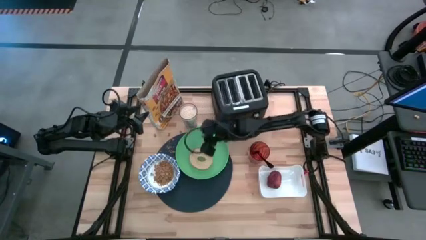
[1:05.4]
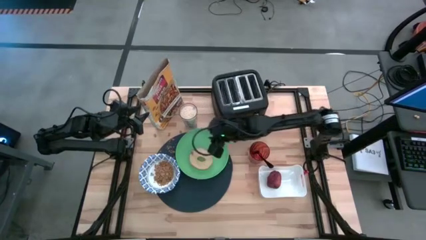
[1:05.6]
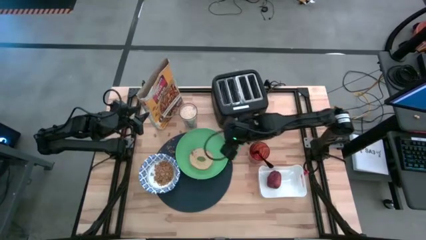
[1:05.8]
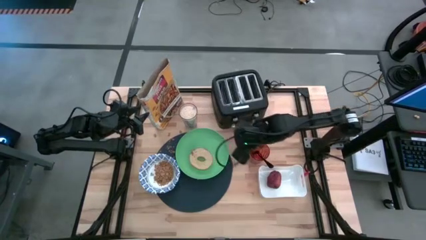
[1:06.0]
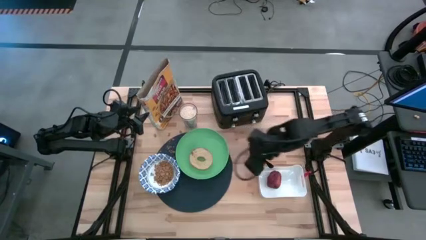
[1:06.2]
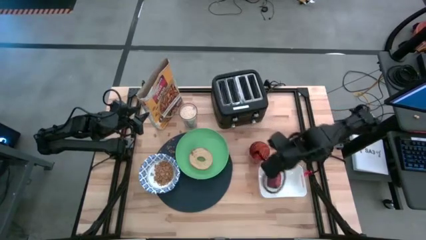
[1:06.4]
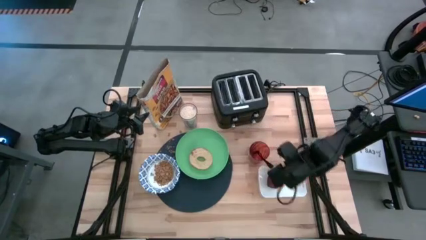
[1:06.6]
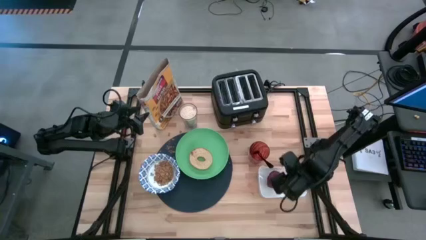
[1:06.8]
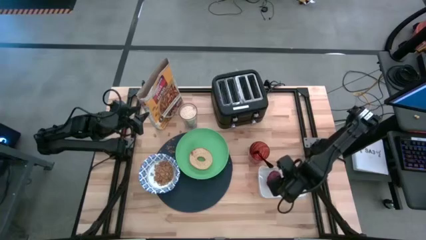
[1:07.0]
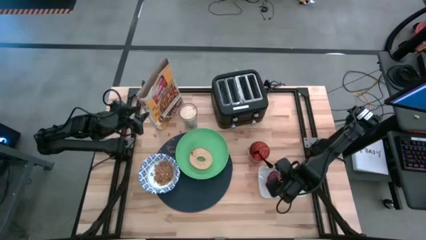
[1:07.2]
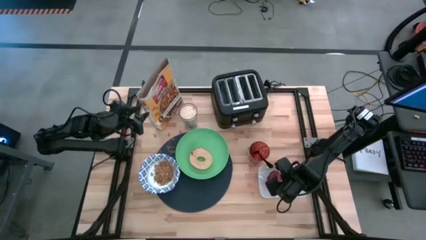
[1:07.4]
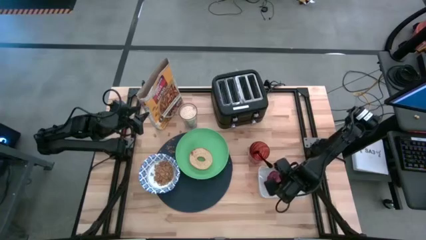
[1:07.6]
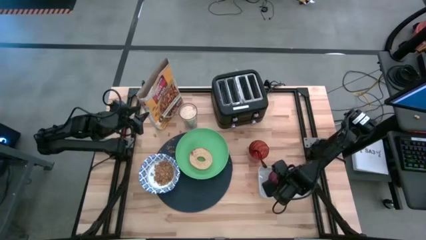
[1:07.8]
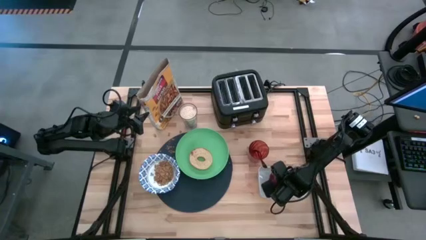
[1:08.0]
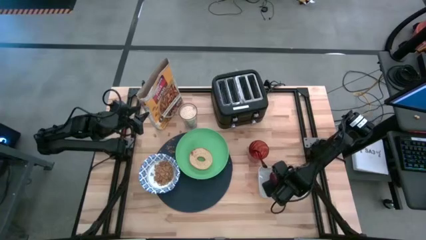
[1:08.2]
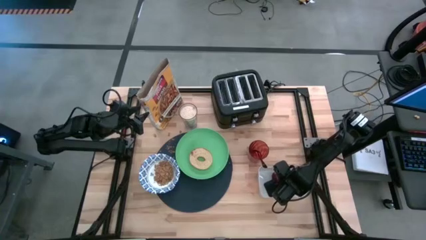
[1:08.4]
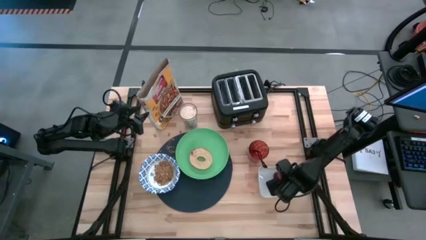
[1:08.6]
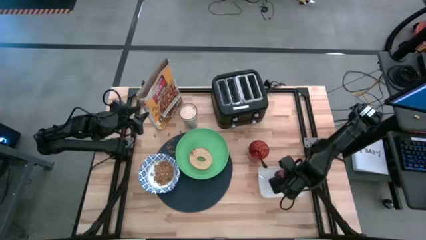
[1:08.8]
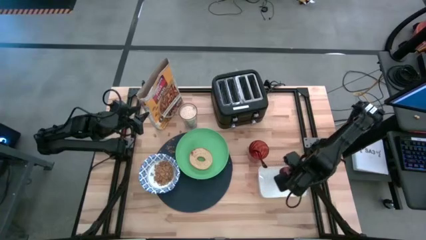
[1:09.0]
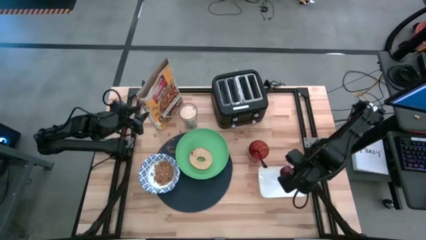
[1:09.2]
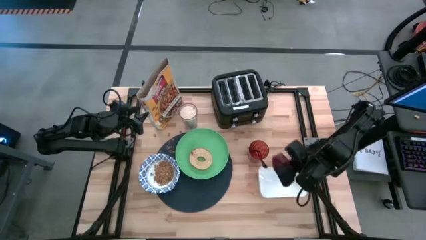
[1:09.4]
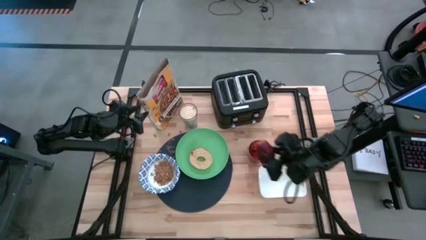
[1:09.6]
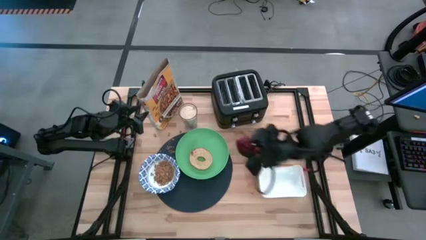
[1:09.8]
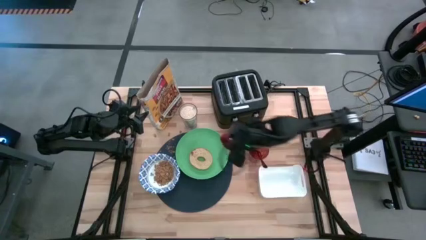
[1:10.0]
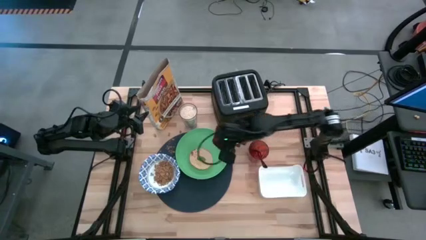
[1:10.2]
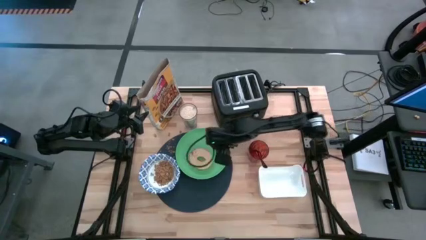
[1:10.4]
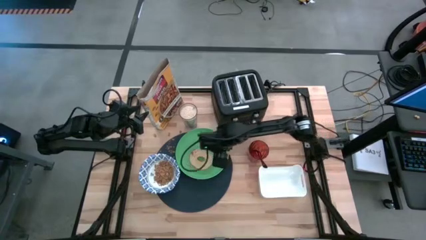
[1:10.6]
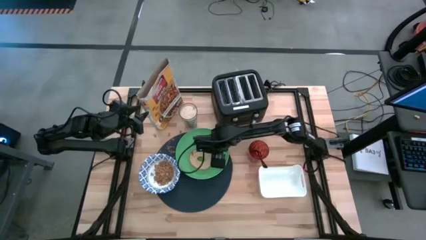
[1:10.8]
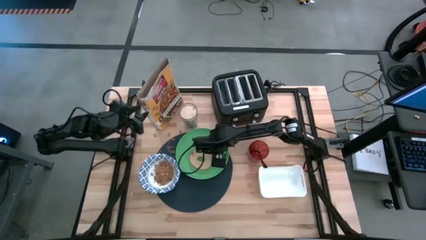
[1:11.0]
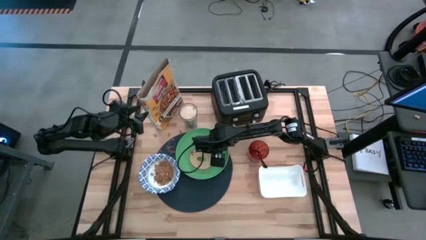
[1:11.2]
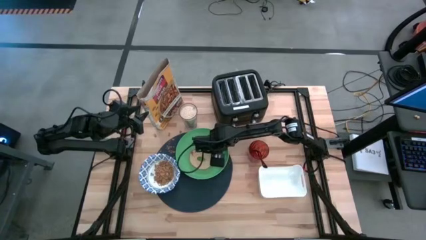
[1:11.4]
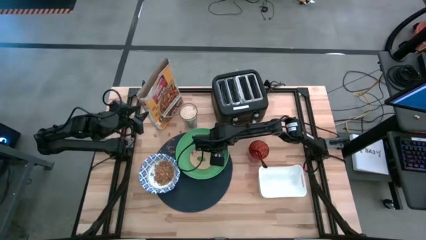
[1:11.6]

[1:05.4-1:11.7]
Task: Arrange a breakfast setting
Put the apple on the green plate

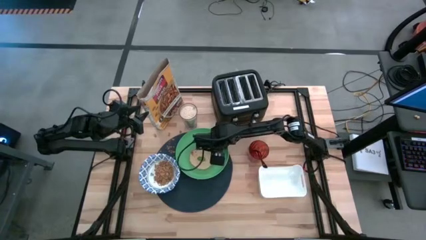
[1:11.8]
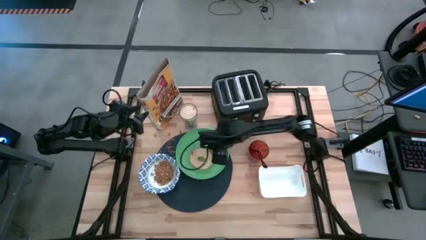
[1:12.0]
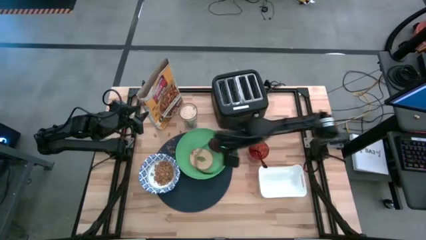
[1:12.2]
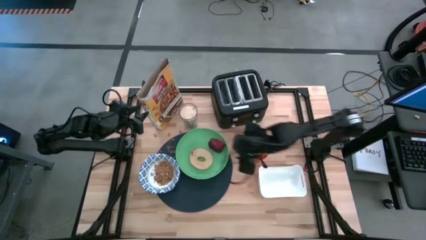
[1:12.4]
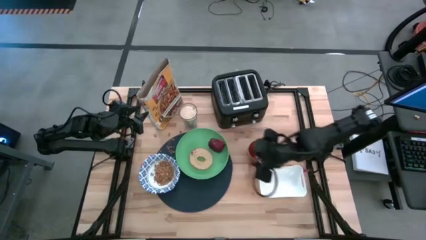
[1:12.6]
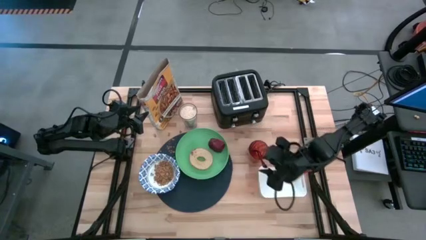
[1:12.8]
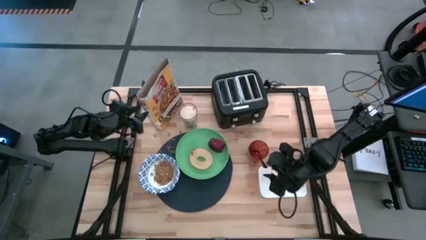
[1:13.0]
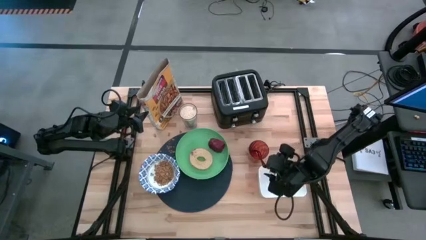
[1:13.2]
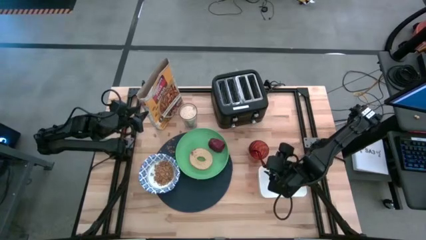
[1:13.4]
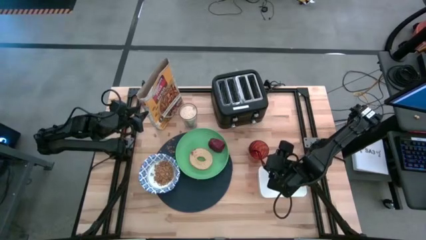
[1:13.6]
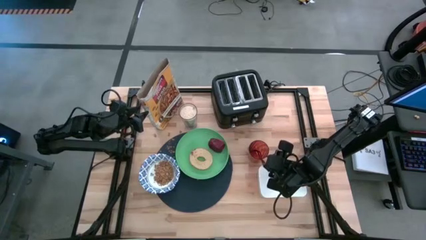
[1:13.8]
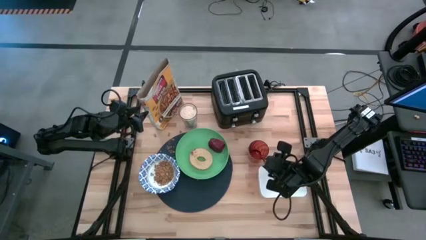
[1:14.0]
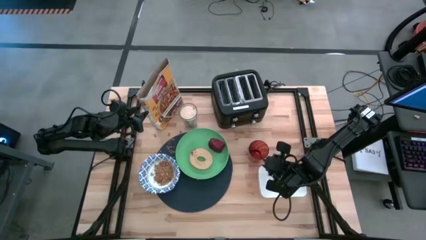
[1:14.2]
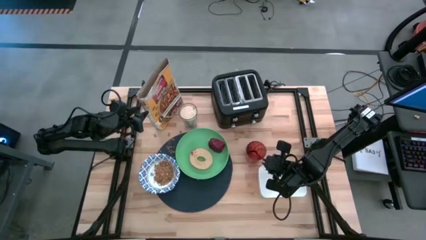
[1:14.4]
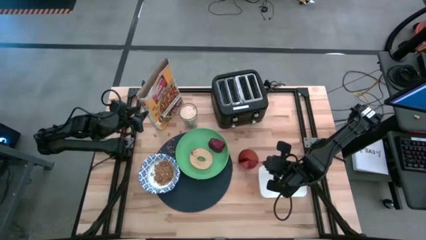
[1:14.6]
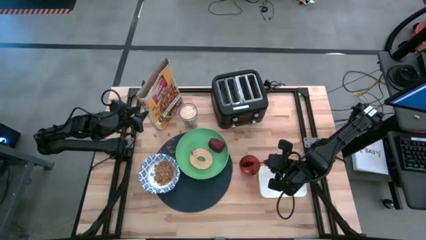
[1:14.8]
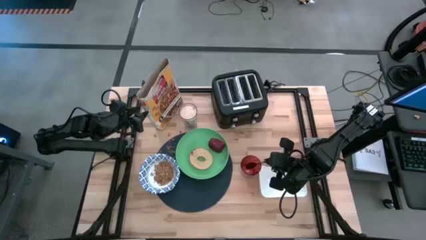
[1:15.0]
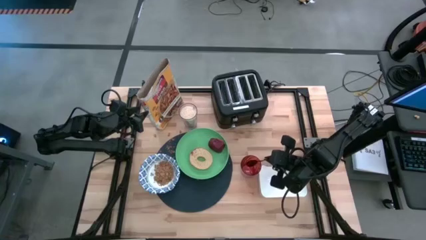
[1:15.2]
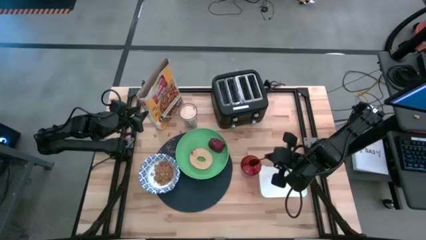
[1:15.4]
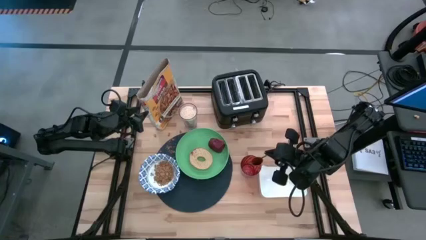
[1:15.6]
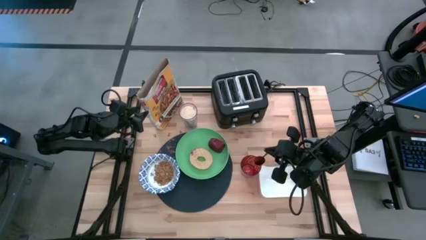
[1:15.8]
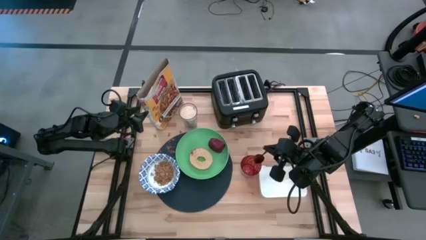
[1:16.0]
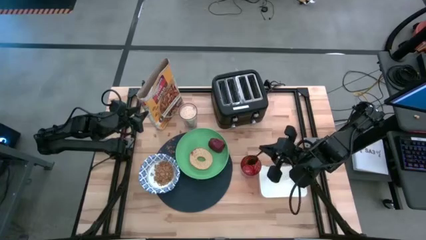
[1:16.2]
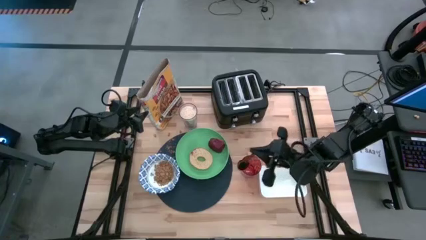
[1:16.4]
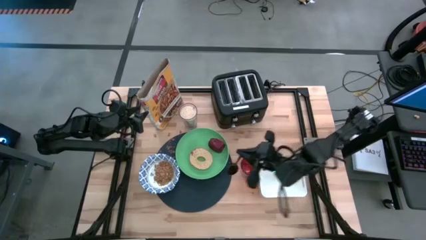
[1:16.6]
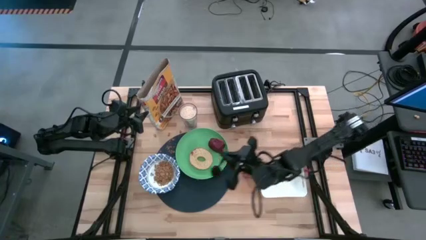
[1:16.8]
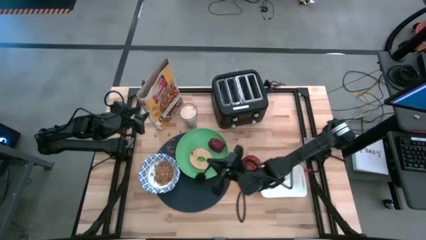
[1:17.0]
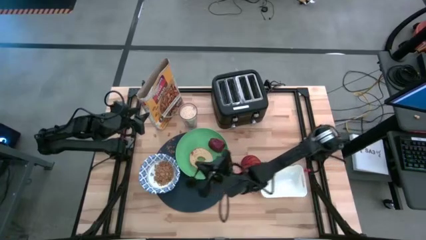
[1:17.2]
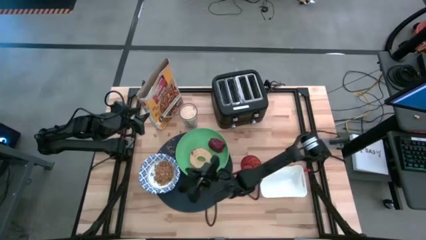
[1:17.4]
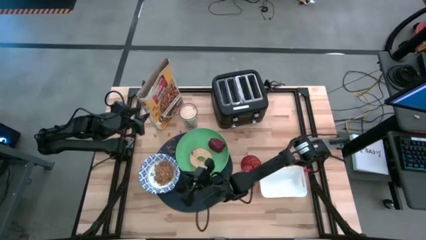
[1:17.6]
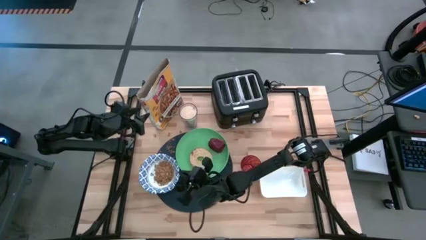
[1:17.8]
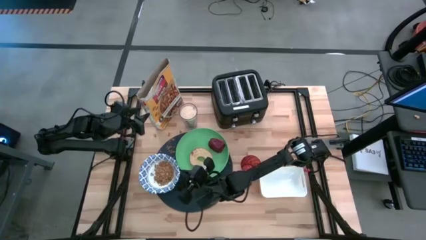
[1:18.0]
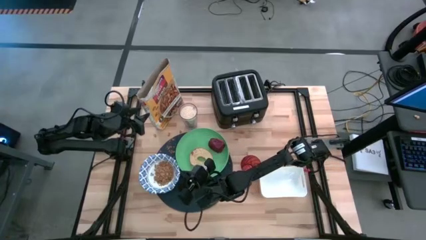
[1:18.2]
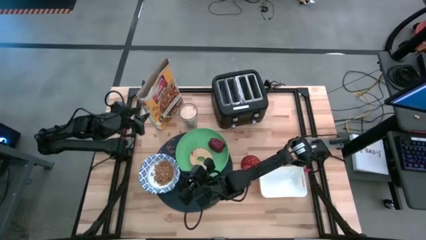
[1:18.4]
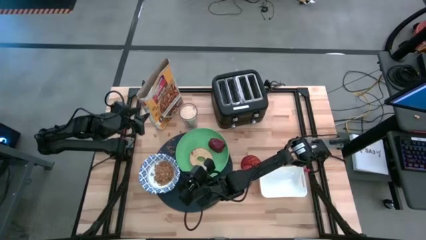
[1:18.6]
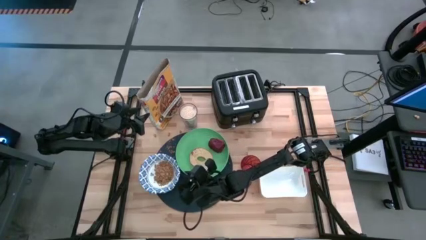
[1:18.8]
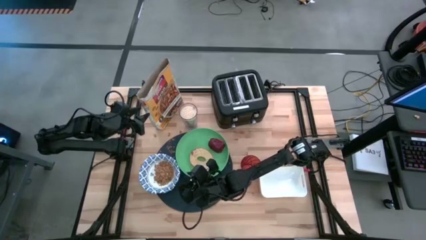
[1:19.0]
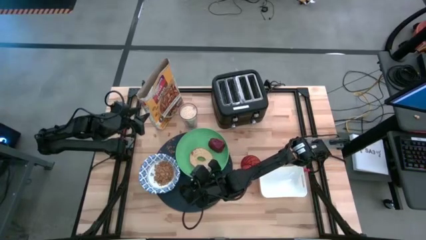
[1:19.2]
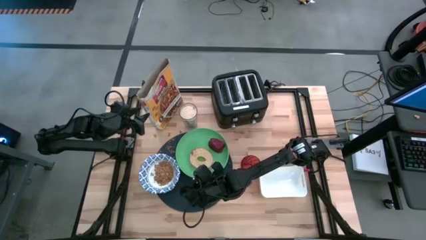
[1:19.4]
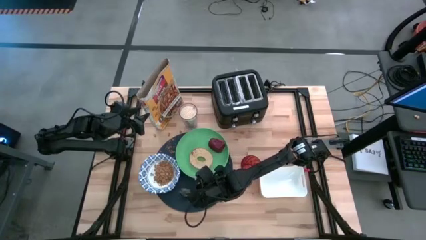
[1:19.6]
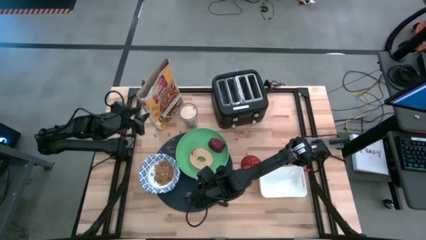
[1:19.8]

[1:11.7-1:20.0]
Put the spoon on the black table mat at the bottom of the green plate
